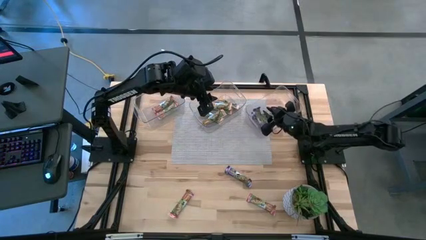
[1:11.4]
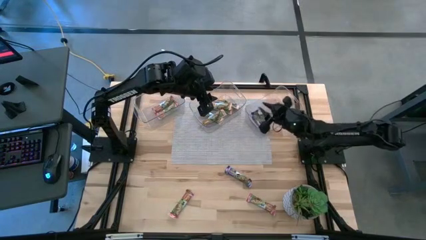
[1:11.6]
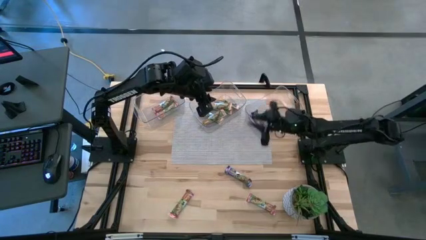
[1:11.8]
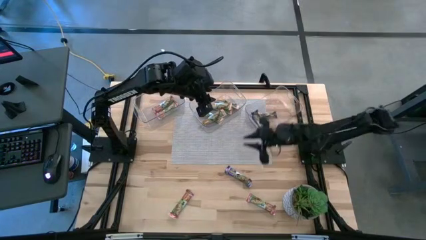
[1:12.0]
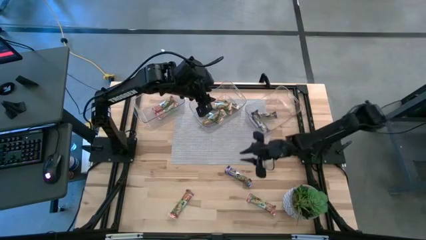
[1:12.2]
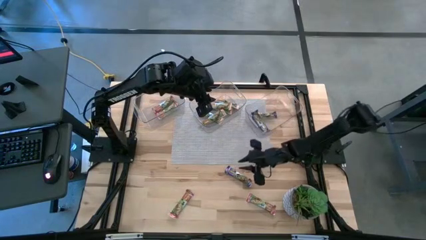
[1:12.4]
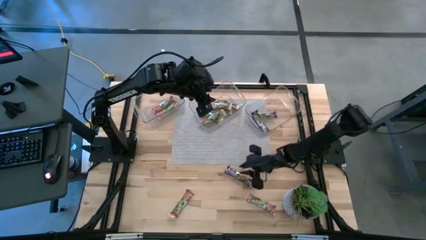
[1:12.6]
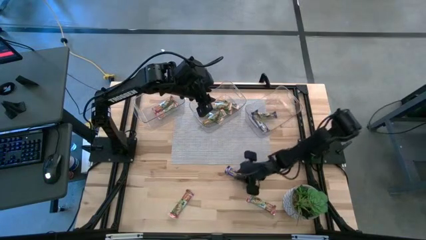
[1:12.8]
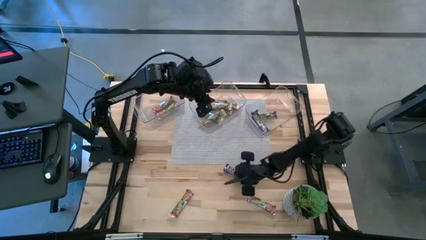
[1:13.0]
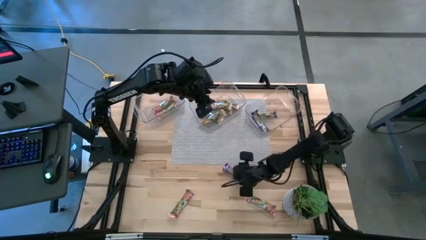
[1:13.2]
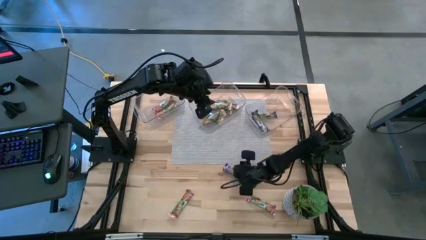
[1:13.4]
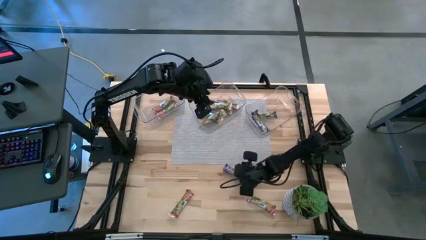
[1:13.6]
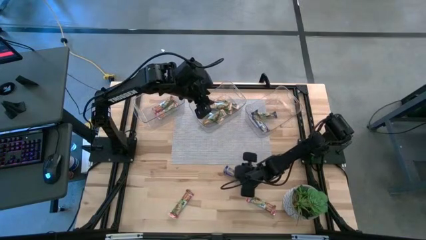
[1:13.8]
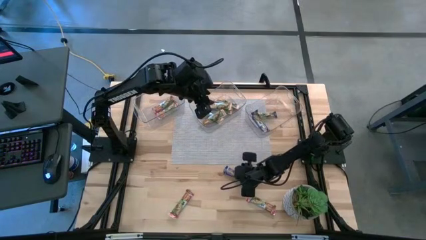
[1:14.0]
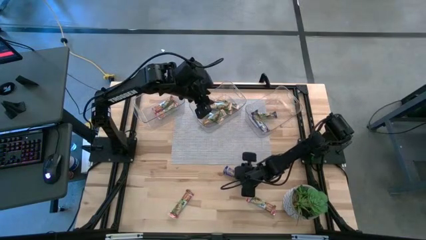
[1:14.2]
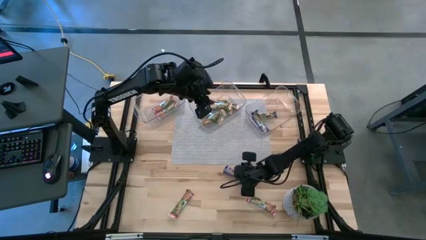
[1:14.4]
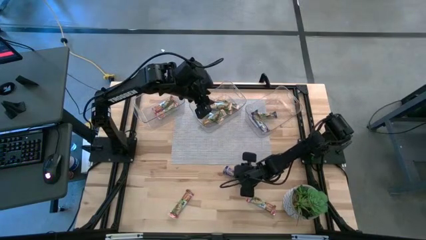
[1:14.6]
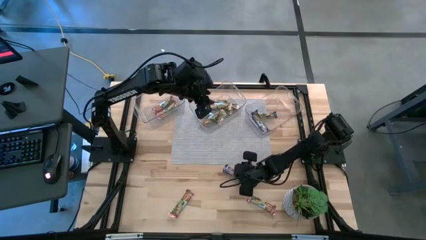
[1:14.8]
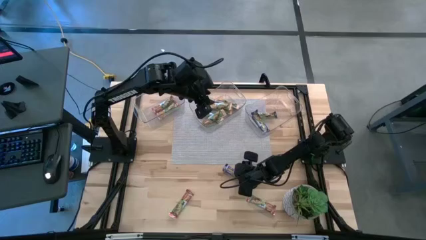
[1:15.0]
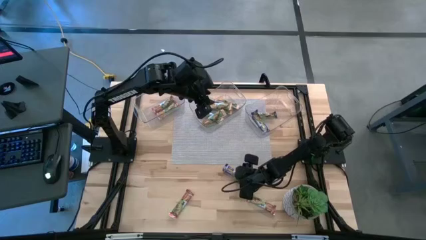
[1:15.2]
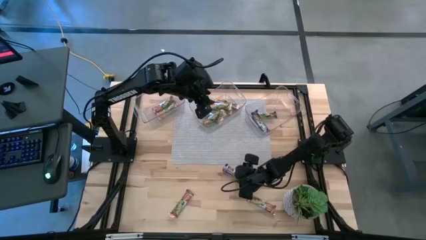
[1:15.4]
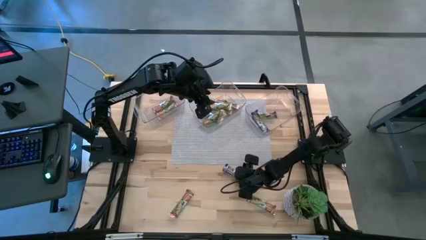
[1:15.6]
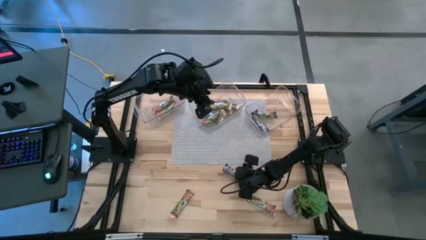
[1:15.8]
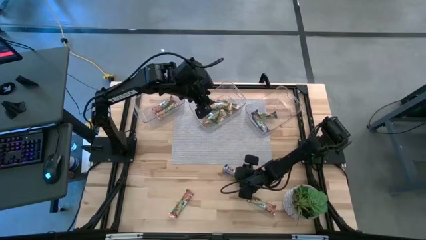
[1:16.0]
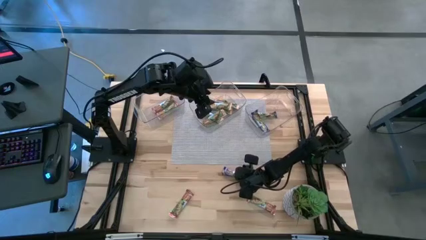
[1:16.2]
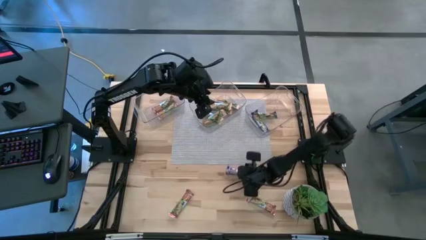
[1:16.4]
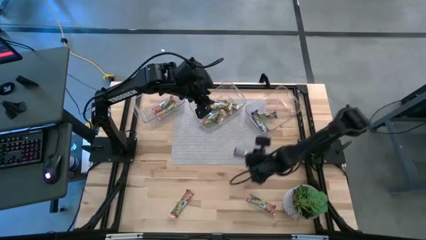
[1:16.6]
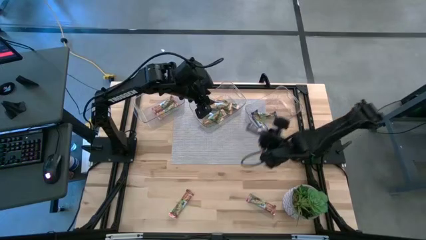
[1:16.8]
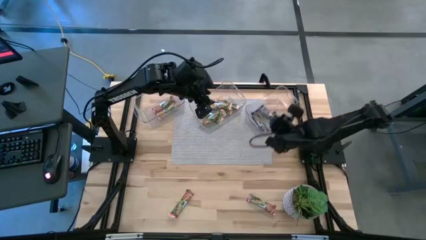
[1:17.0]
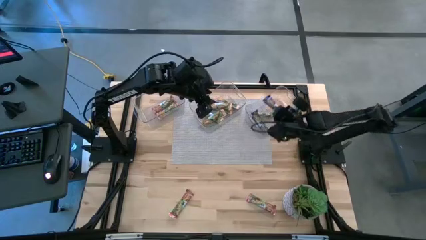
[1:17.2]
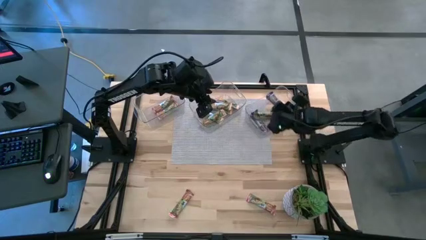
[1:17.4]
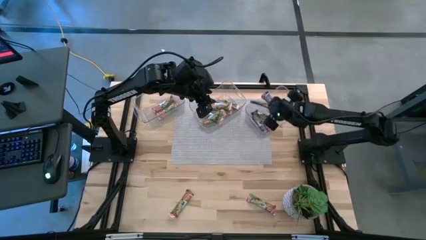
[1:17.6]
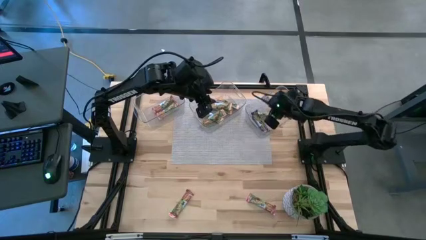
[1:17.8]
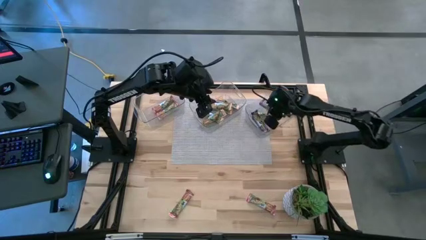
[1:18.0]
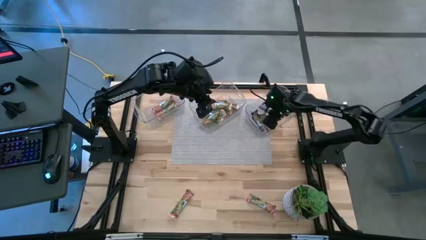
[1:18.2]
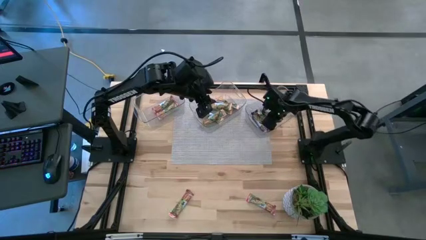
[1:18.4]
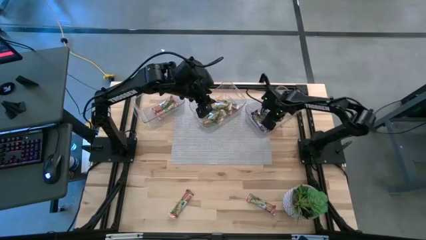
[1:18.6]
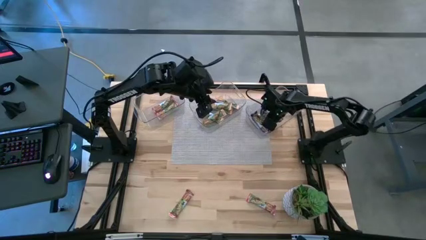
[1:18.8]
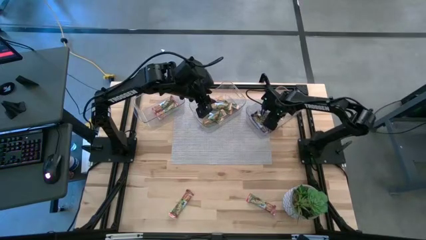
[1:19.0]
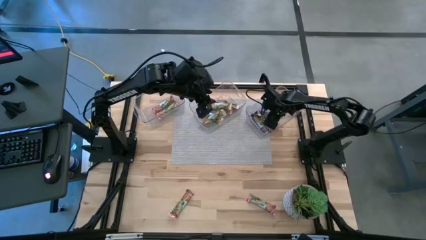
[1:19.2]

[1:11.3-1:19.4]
Task: Pick and place Granola Bars by type
Put the blue granola bar into the right transparent bin

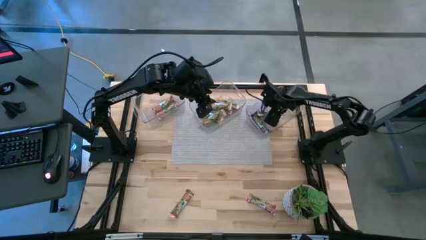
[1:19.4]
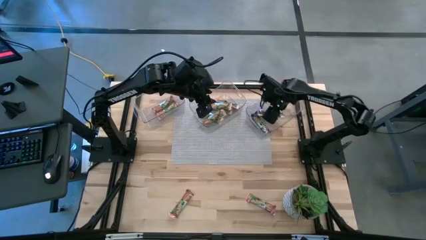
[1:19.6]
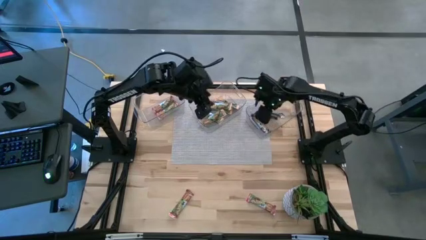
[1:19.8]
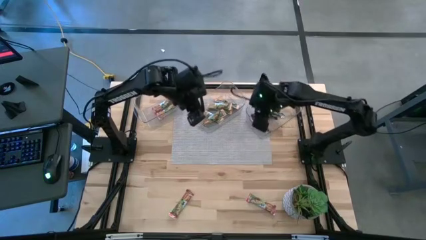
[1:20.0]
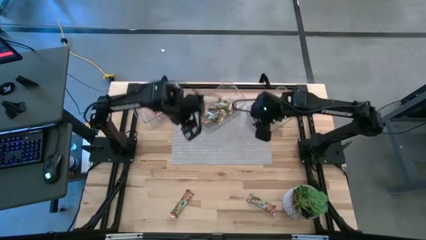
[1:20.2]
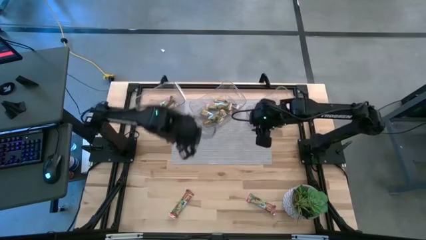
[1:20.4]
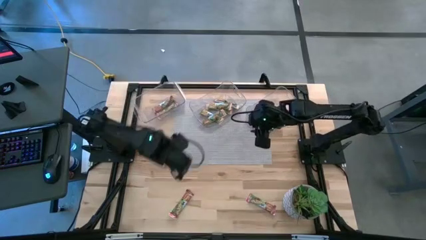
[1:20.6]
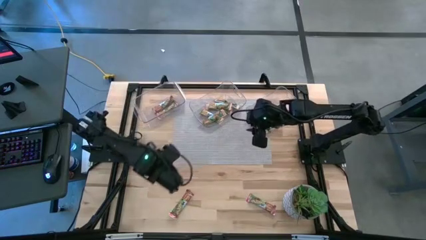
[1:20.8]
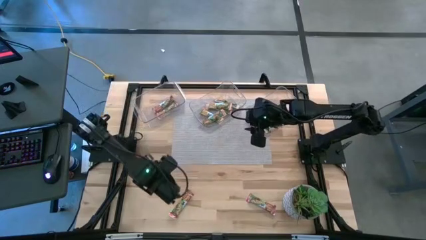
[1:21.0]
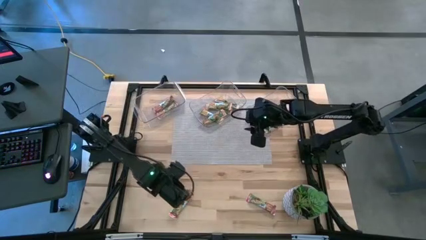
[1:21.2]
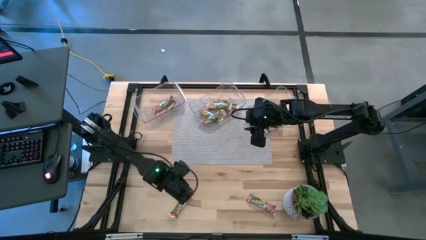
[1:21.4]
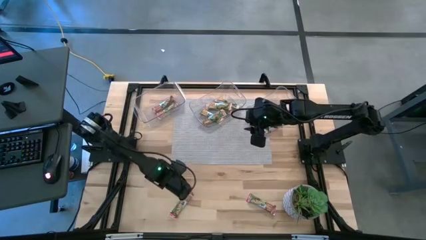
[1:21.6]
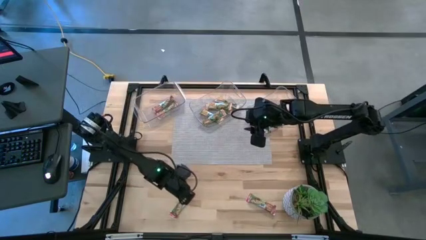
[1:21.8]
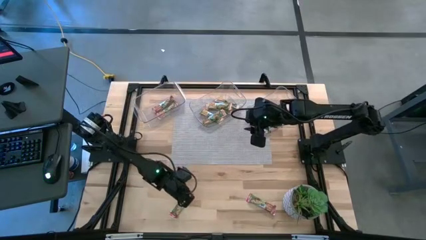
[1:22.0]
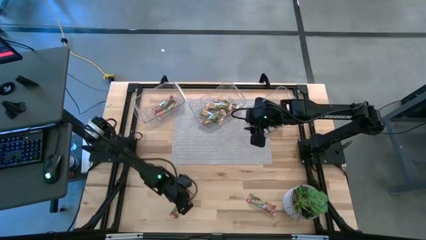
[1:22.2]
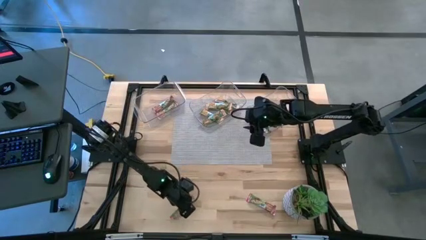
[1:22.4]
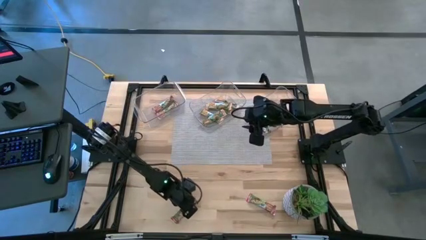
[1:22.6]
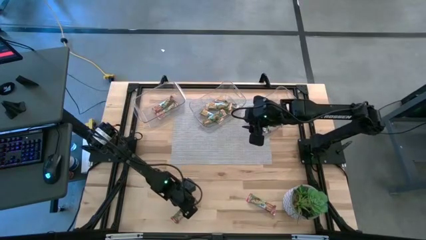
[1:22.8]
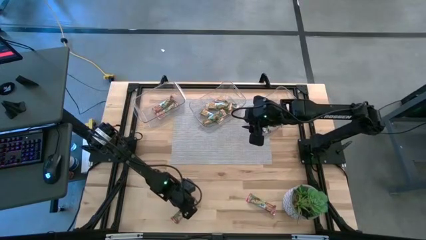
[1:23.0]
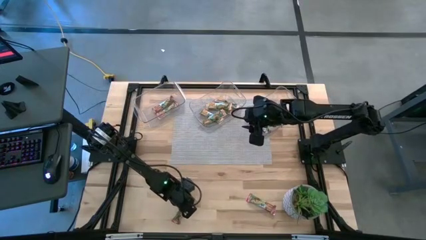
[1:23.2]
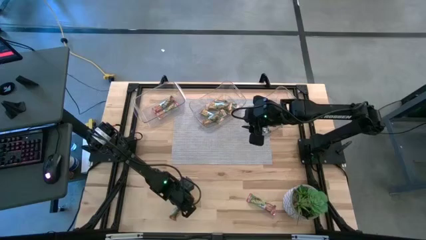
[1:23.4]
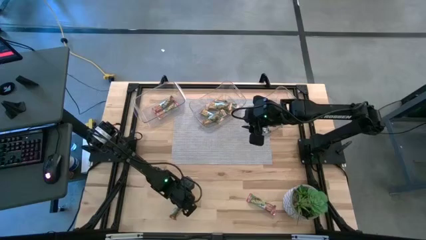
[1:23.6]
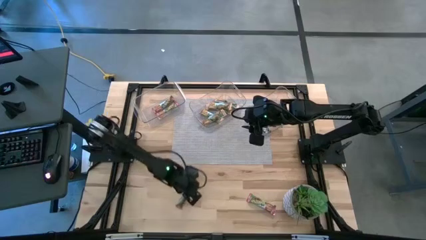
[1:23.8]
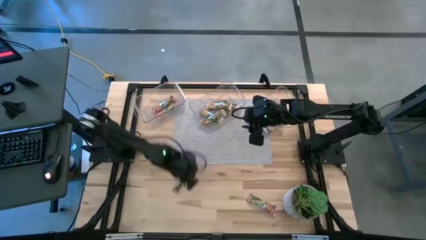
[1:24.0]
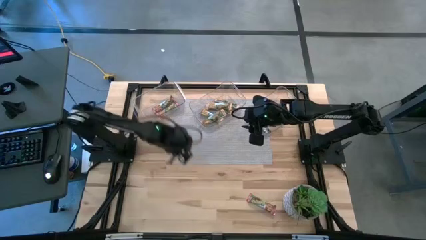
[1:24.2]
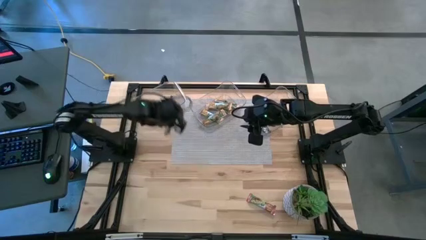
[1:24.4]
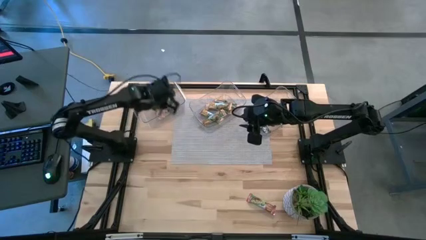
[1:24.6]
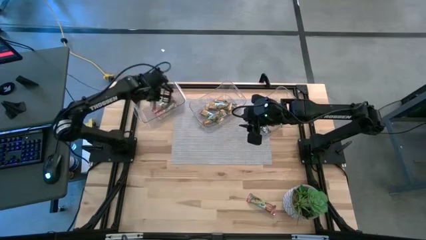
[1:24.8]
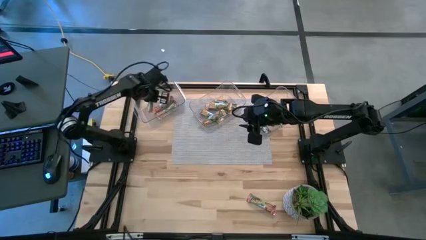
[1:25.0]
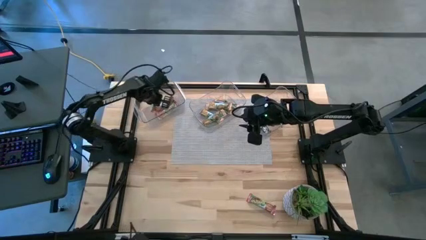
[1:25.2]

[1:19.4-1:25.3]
Put the red granola bar into the left transparent bin

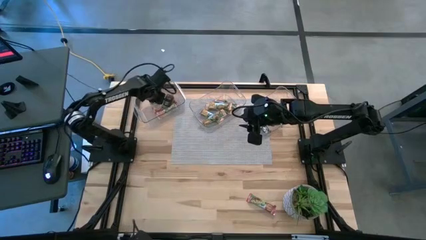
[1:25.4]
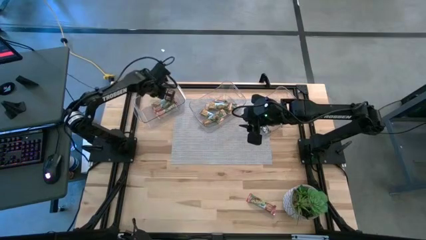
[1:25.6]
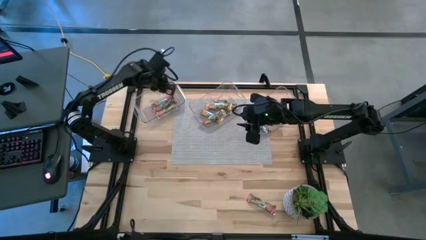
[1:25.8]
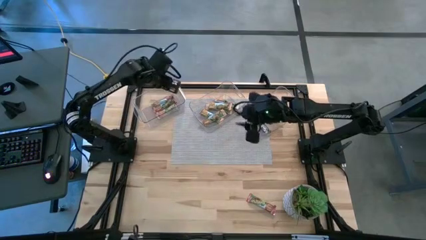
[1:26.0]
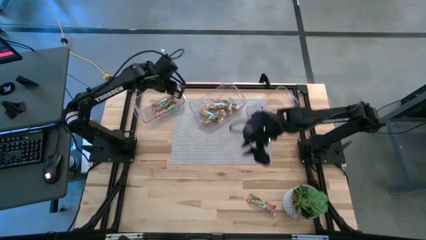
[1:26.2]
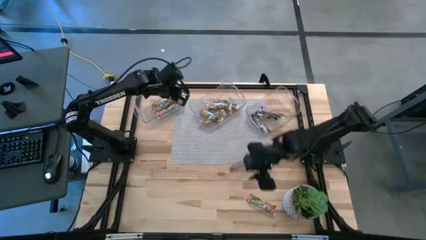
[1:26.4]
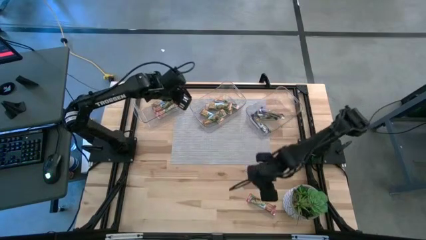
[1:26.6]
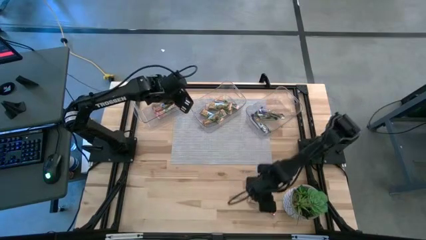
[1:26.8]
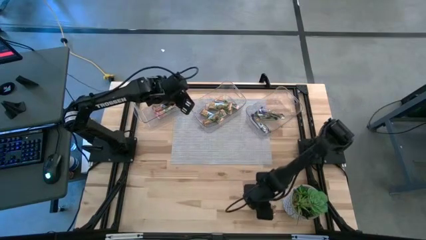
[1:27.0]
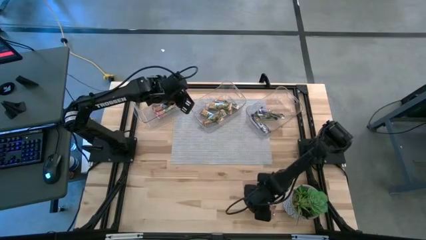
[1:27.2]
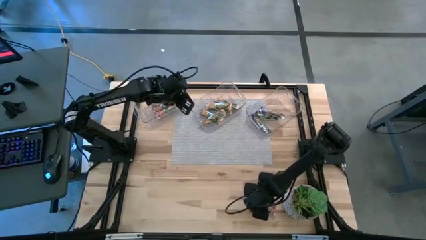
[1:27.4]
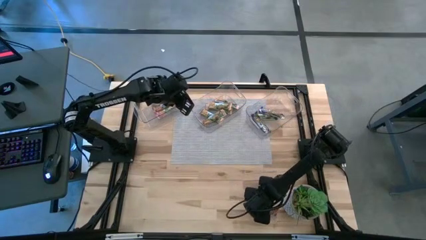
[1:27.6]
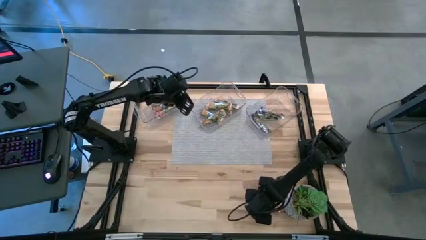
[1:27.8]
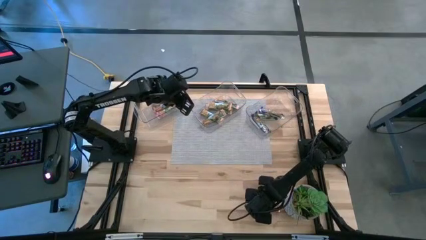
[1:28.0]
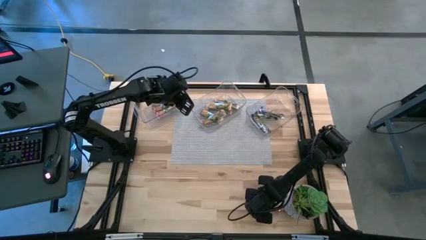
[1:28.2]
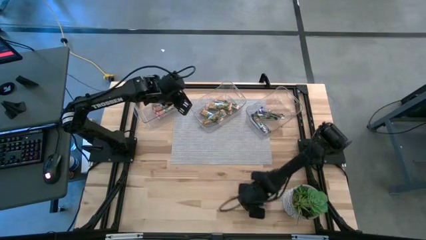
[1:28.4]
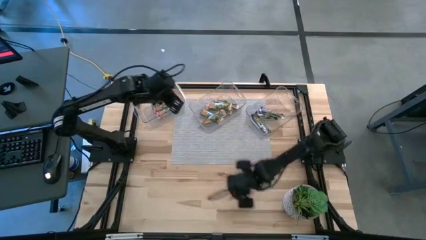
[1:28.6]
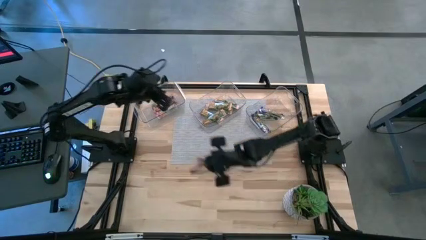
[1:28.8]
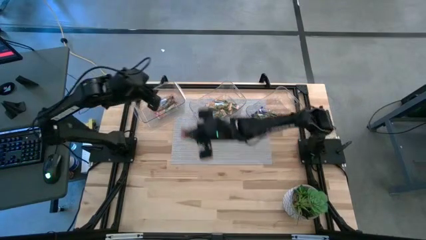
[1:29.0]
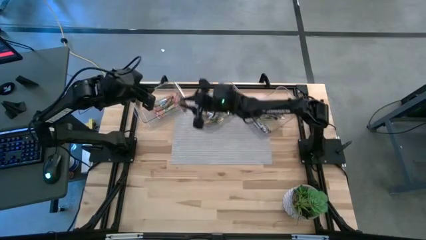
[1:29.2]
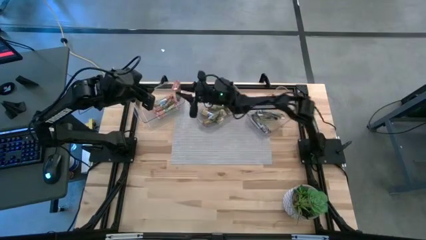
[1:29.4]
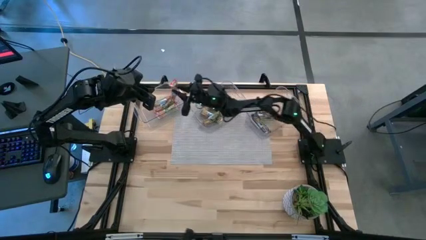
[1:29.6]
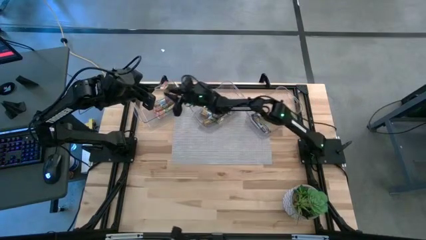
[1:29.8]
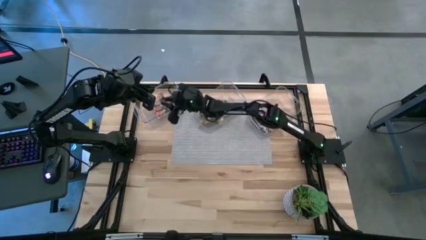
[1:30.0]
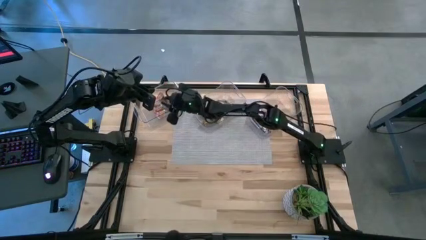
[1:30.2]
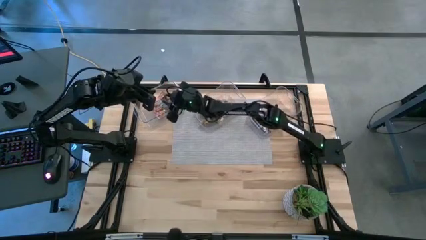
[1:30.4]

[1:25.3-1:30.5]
Put the red granola bar into the left transparent bin
